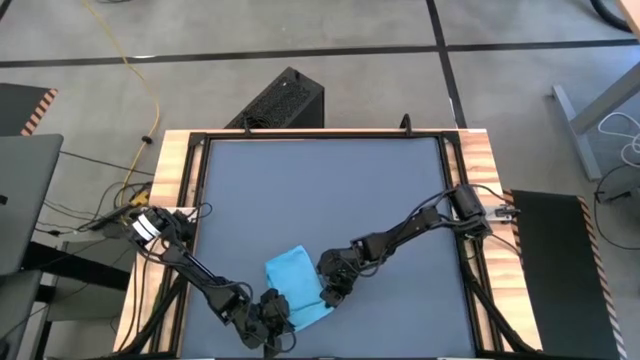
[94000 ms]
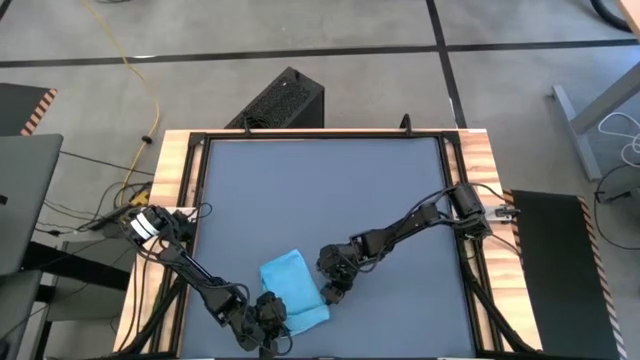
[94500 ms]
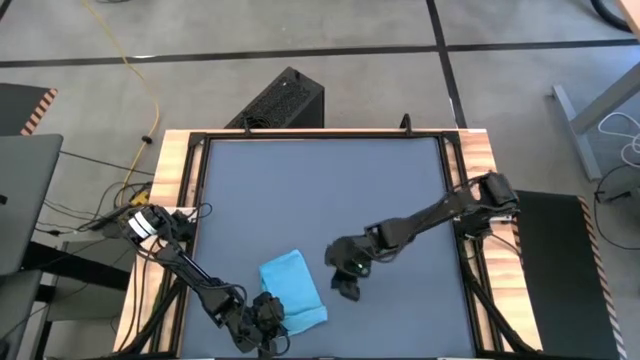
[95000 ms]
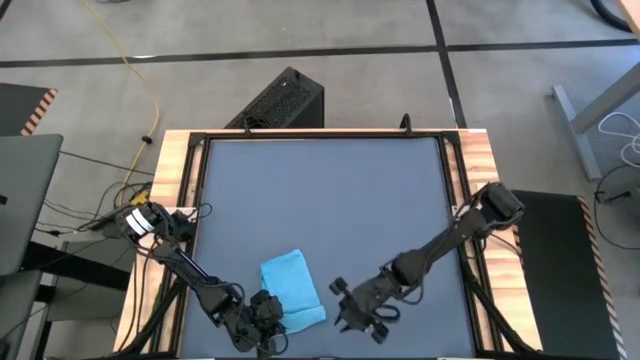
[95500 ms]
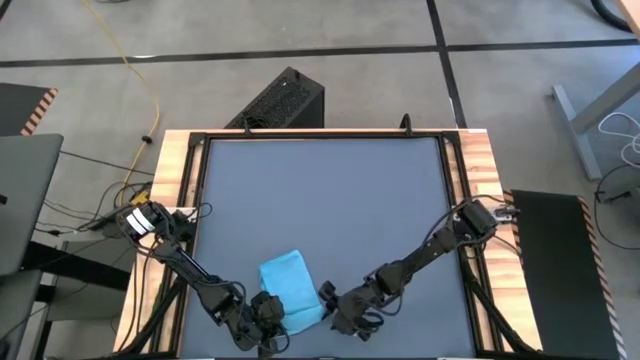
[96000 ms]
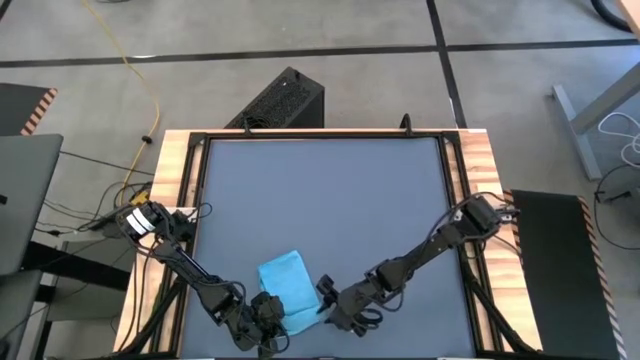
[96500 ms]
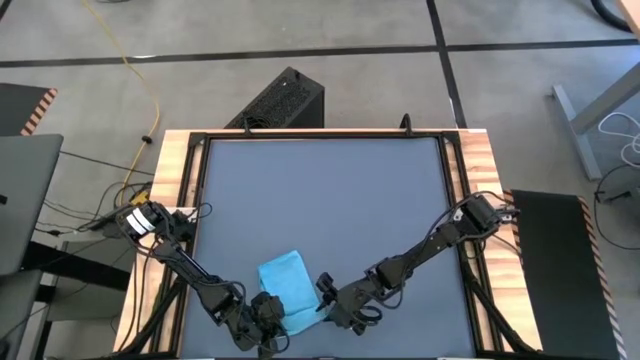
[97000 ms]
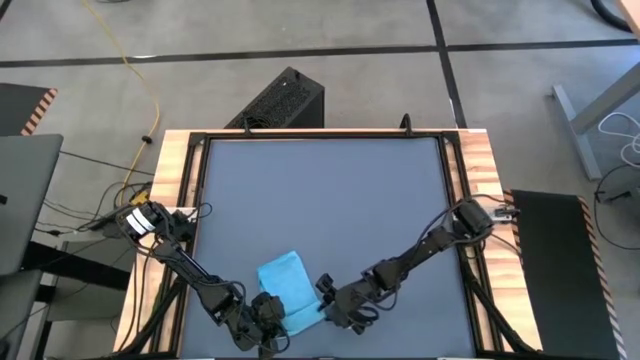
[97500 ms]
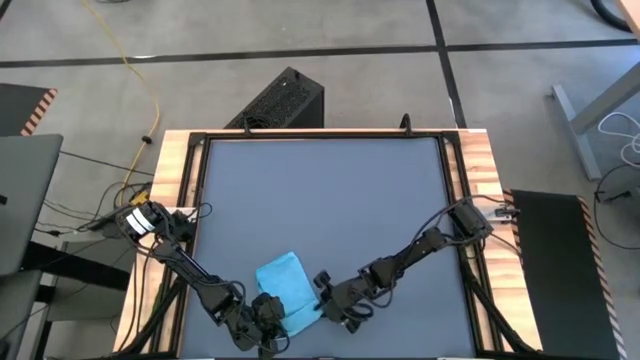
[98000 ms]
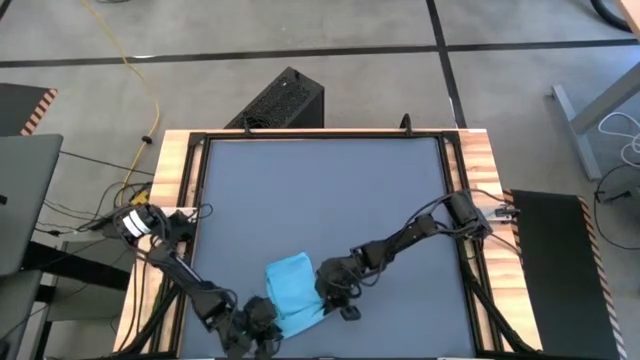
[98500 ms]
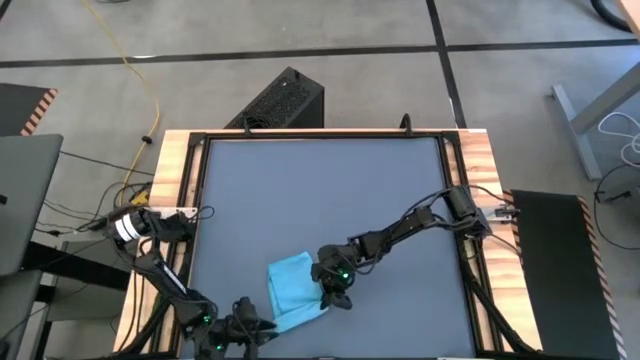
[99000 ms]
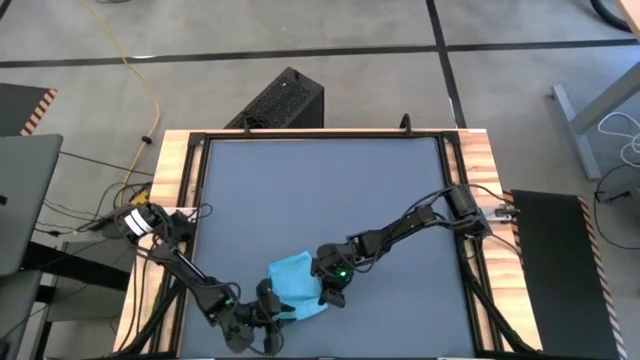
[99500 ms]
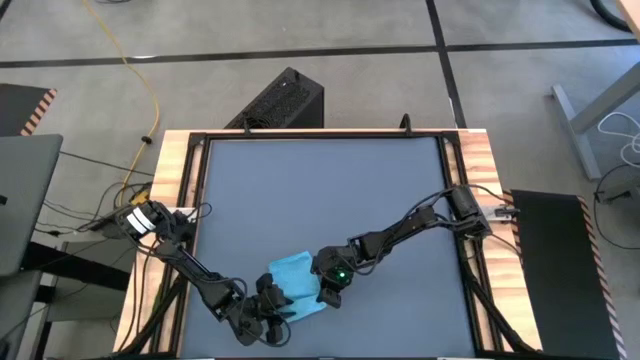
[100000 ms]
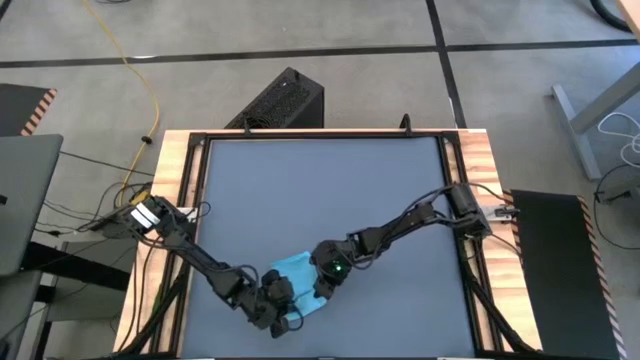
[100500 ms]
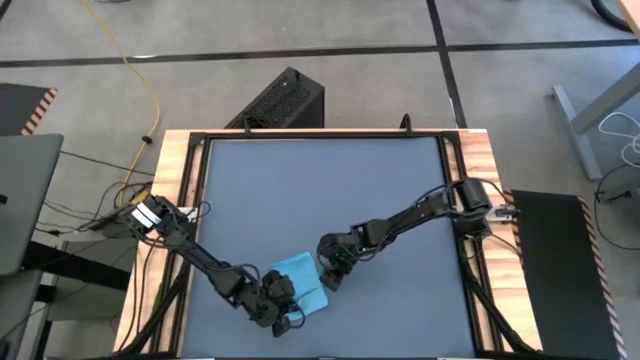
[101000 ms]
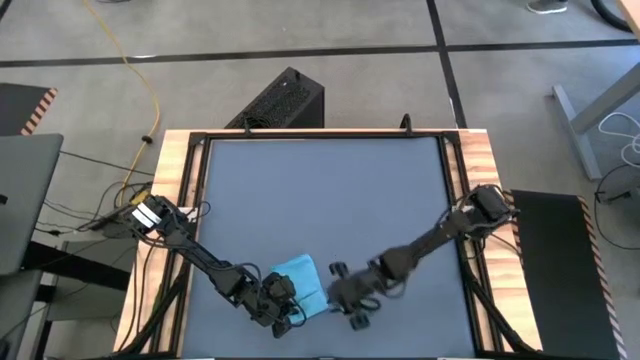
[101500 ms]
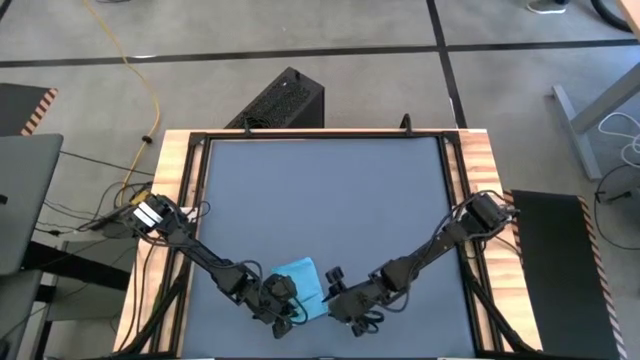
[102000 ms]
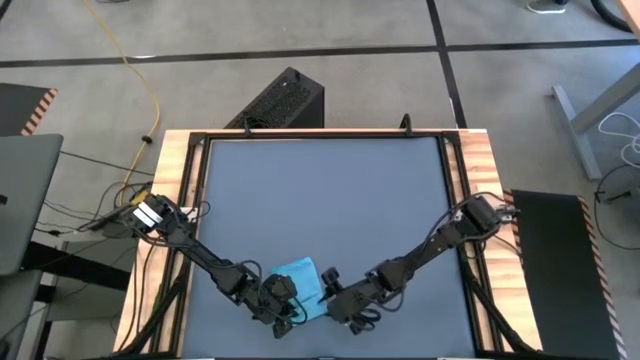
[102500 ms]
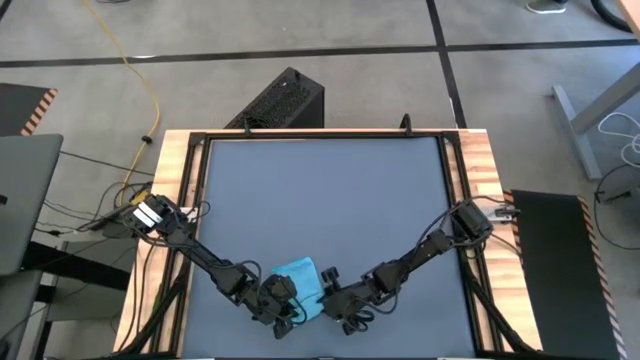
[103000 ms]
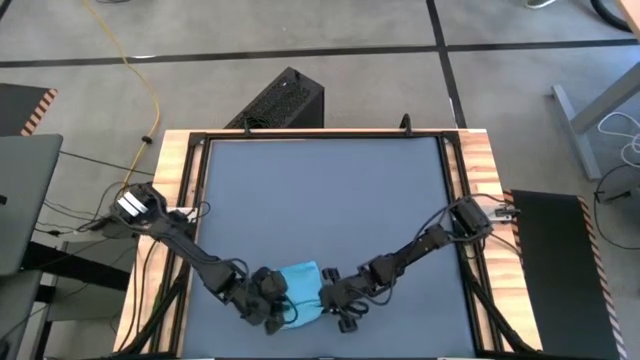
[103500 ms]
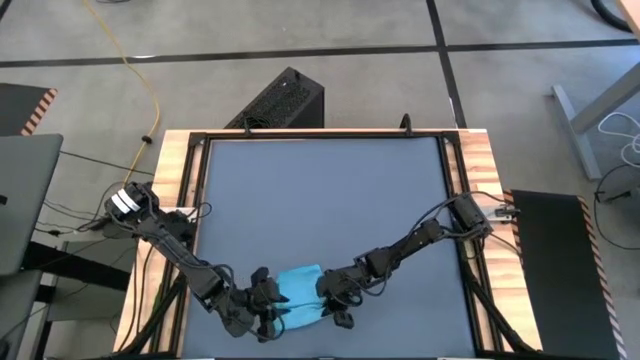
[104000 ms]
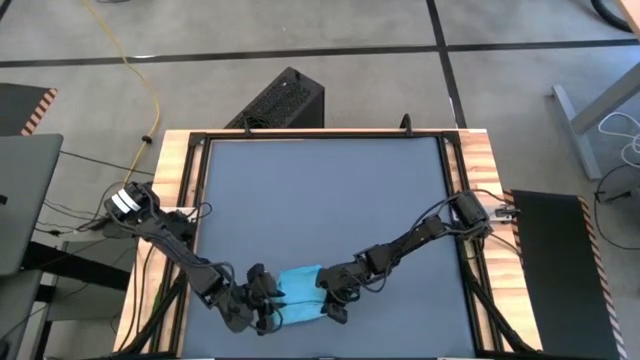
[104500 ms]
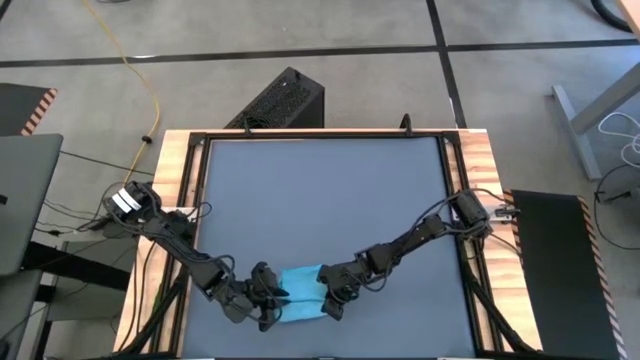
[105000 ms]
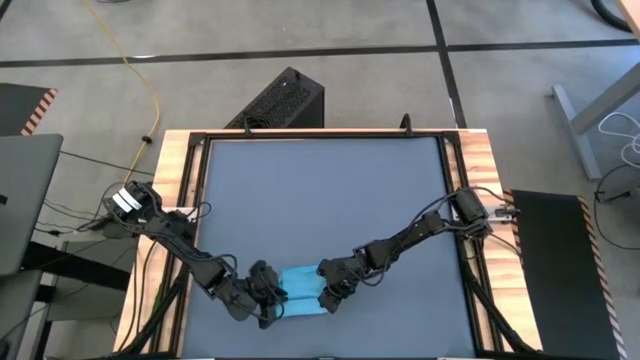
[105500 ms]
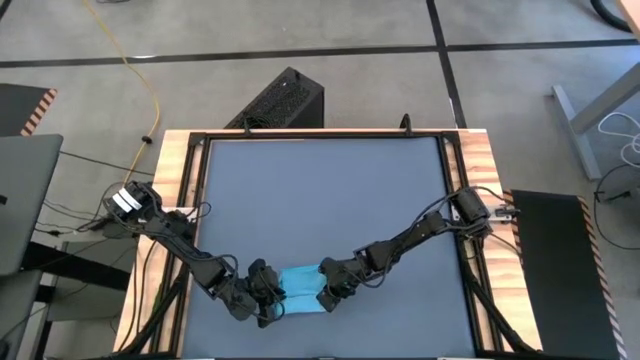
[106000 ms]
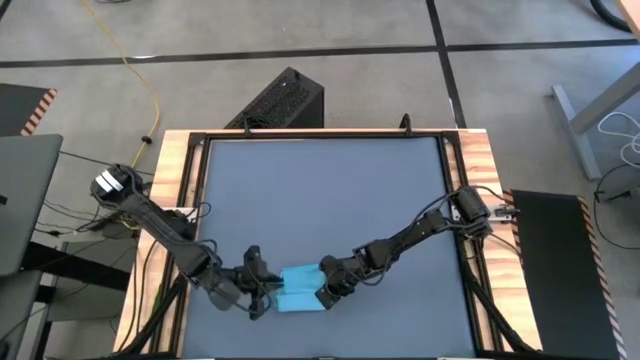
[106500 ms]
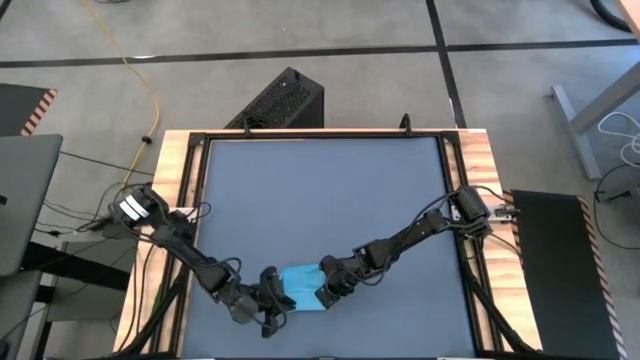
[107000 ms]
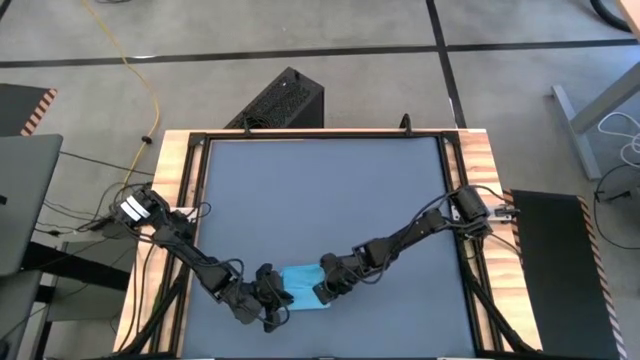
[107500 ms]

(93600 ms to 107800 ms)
Task: Roll towel
Roll the blue towel

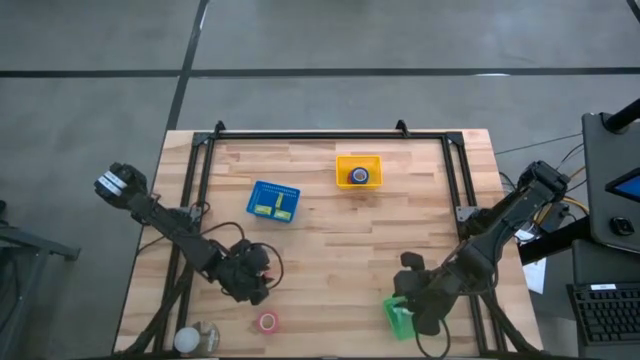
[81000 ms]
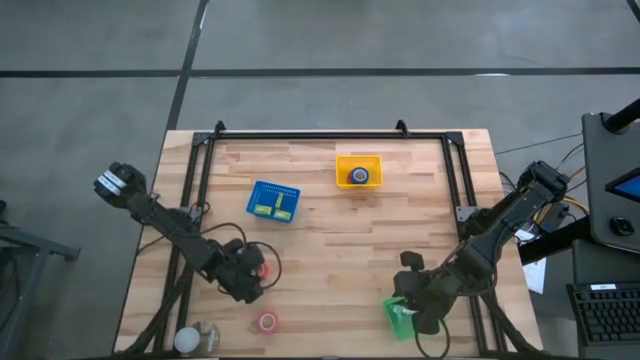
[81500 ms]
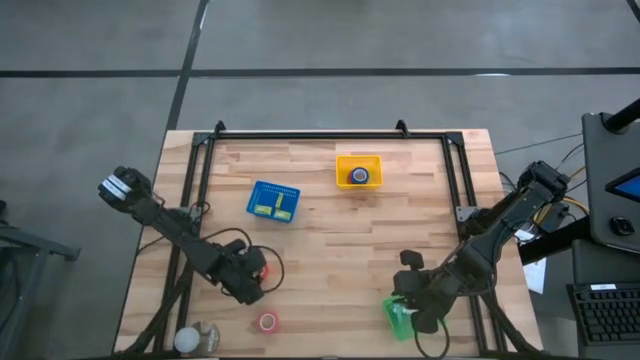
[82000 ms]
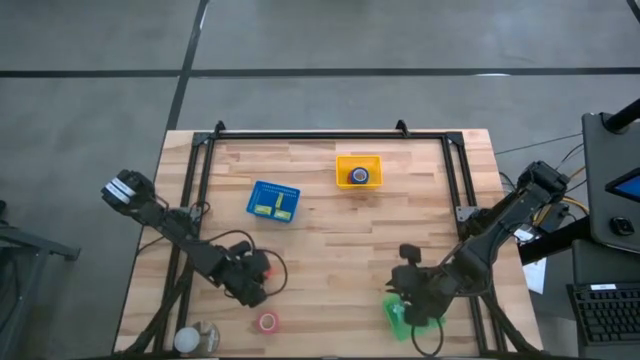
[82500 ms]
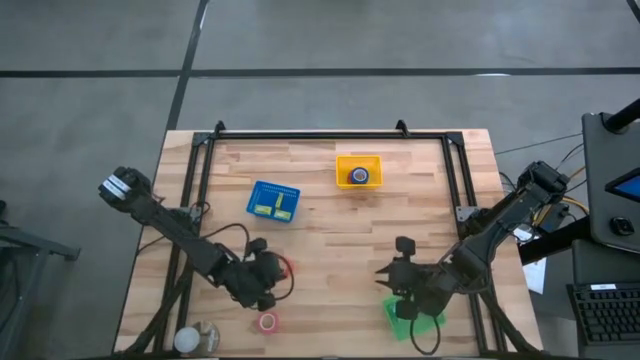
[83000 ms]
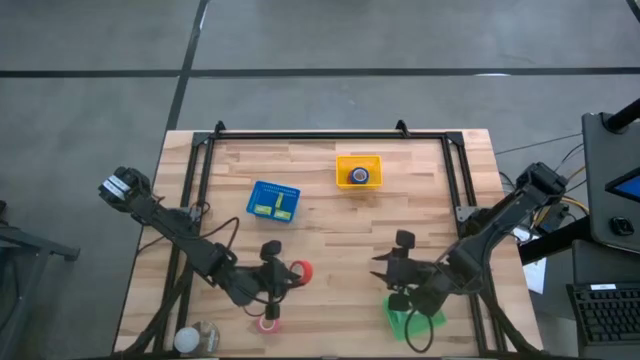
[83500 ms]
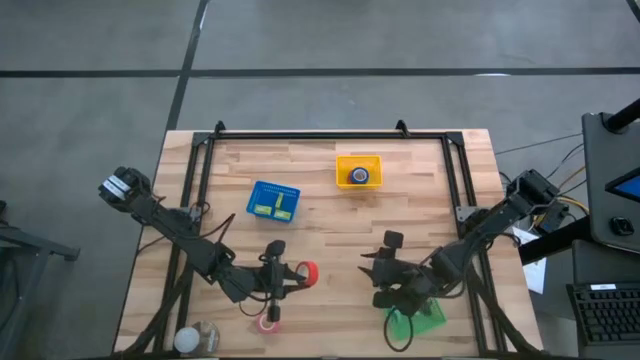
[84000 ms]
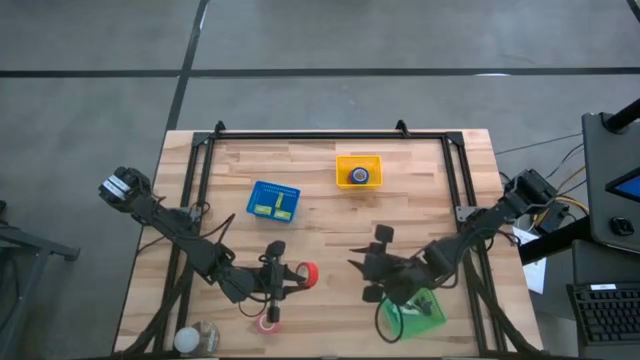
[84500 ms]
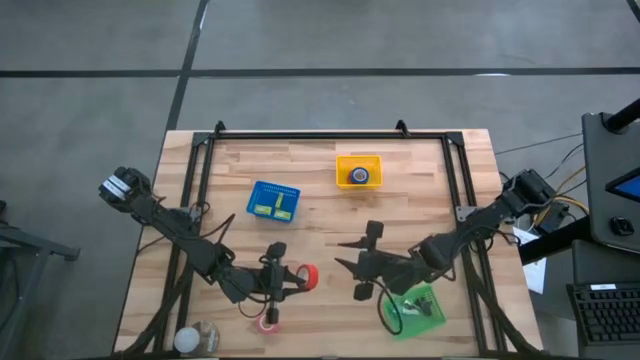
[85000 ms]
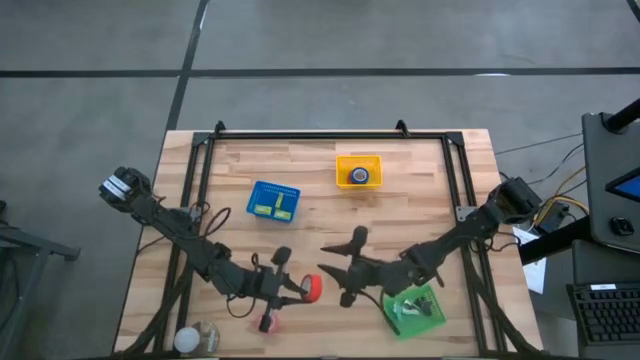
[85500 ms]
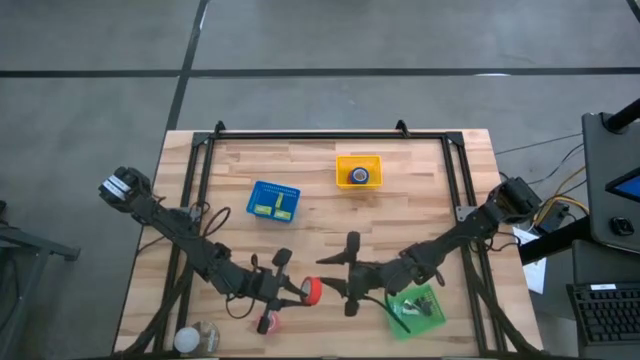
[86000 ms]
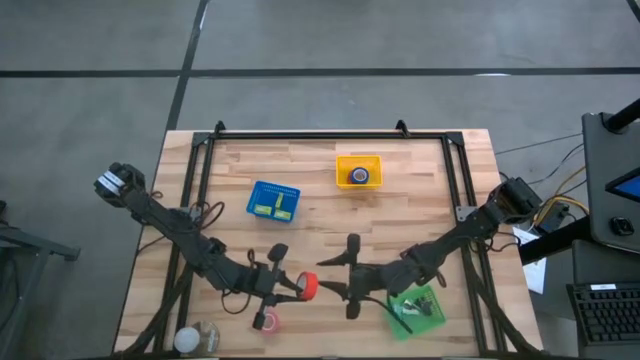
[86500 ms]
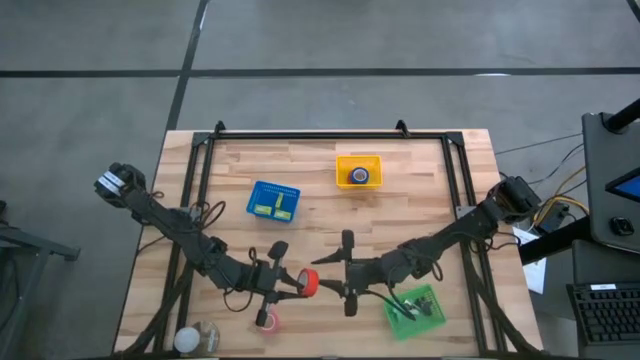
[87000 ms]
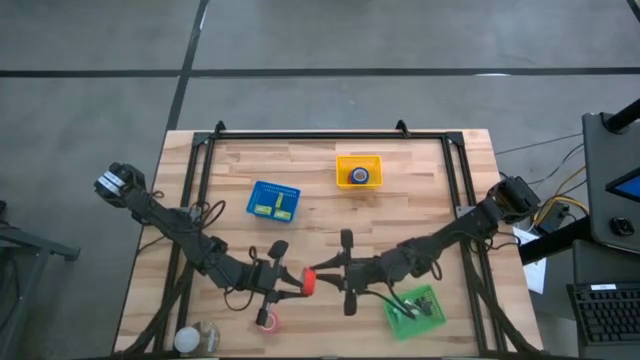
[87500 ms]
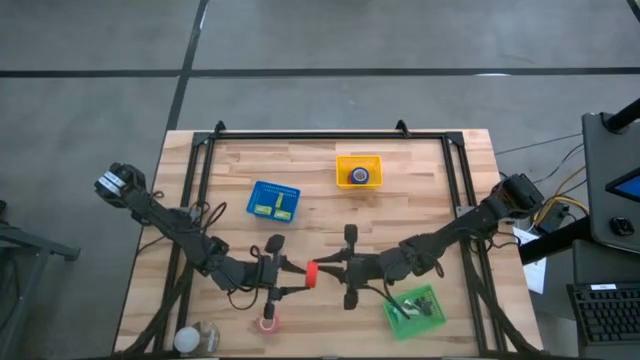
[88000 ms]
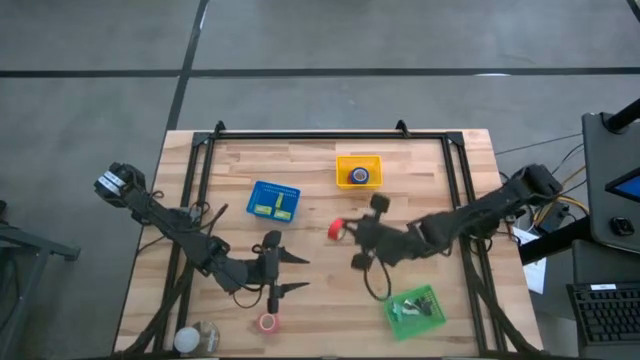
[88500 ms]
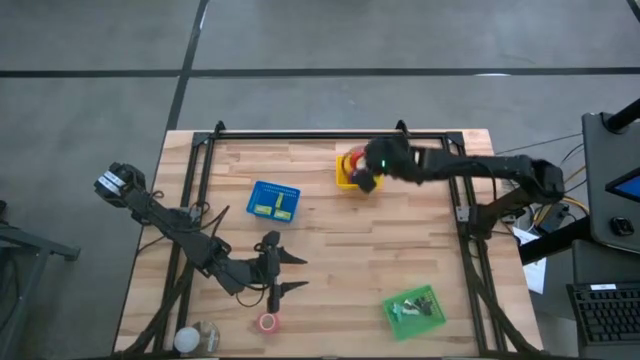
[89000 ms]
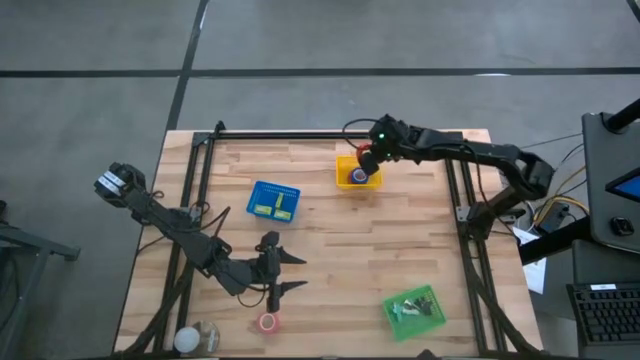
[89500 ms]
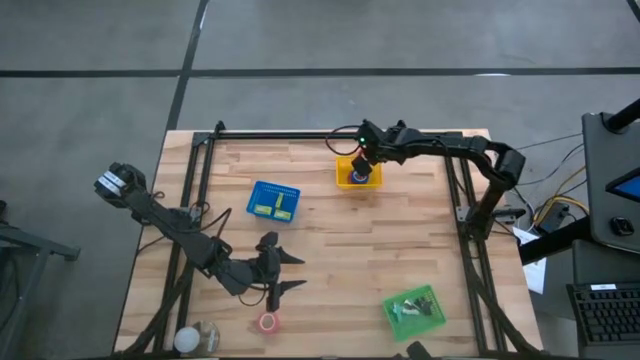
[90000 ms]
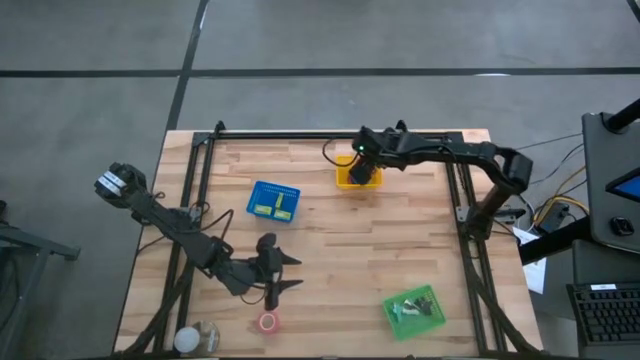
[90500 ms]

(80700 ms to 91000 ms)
Task: Pick and place Stapler, Stapler remover, tape
Put the orange tape into the yellow bin
